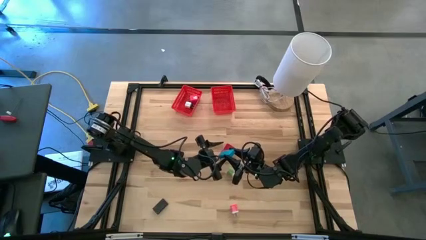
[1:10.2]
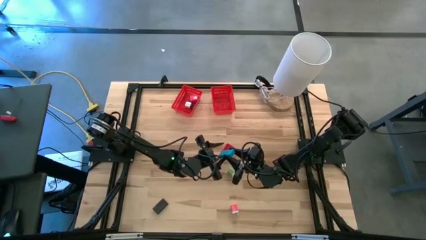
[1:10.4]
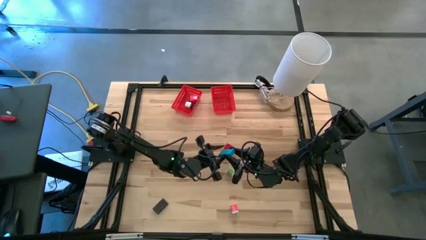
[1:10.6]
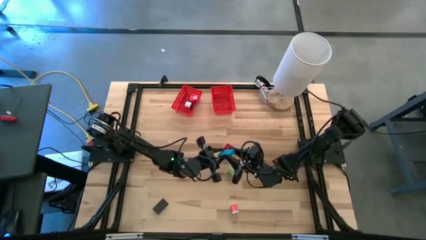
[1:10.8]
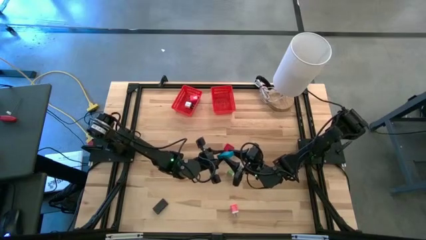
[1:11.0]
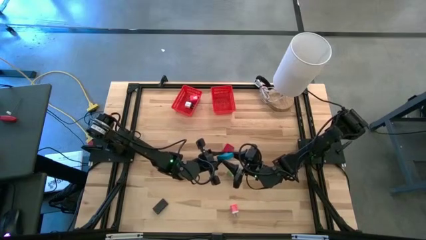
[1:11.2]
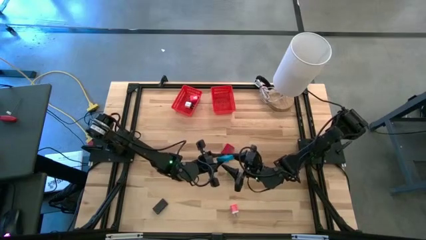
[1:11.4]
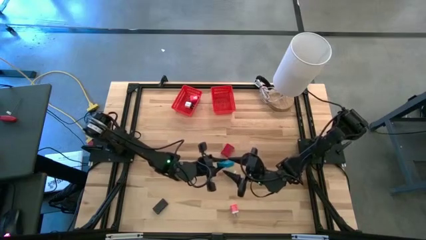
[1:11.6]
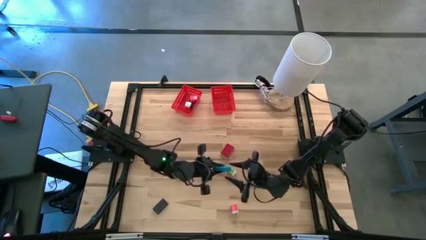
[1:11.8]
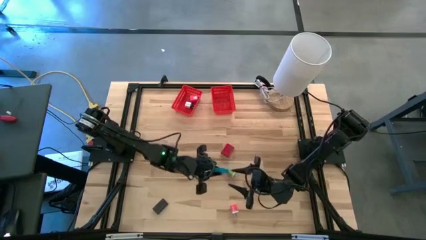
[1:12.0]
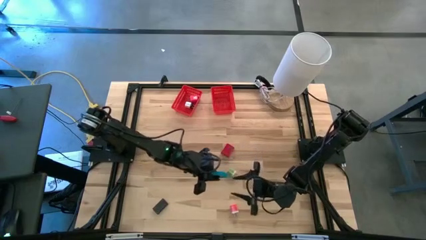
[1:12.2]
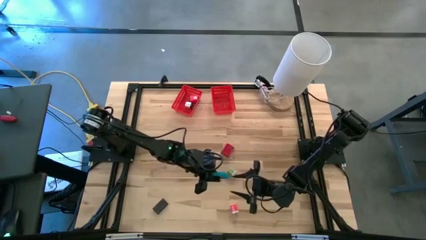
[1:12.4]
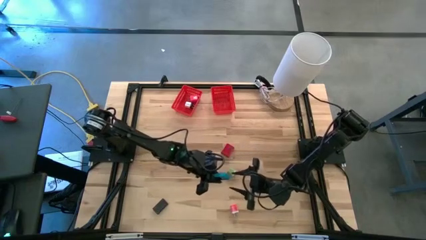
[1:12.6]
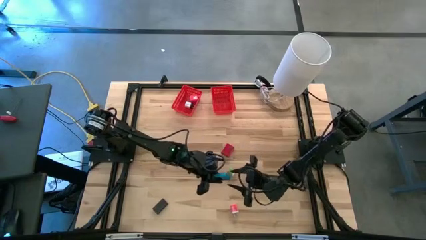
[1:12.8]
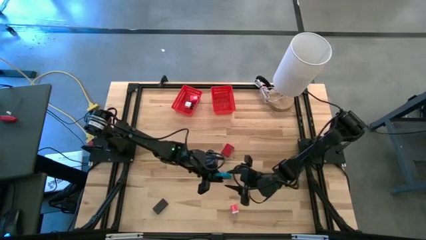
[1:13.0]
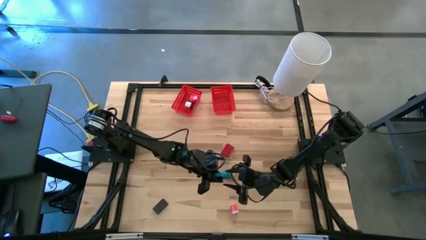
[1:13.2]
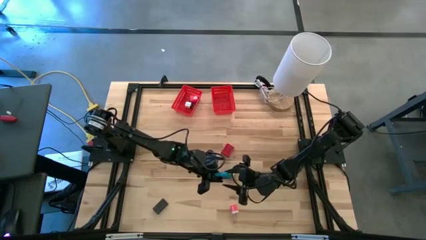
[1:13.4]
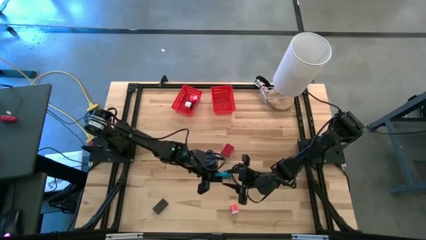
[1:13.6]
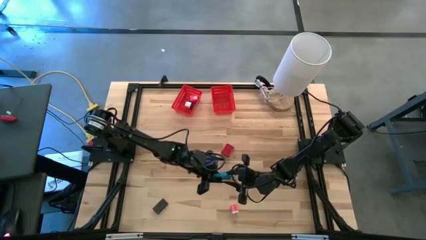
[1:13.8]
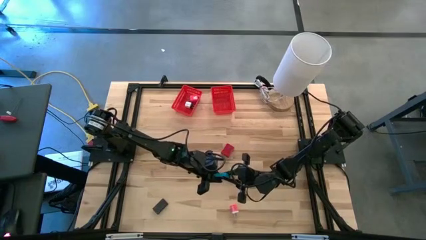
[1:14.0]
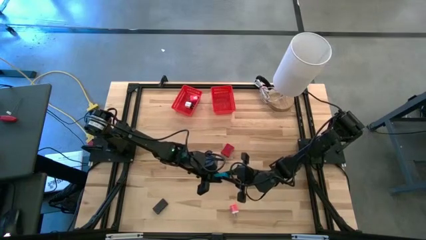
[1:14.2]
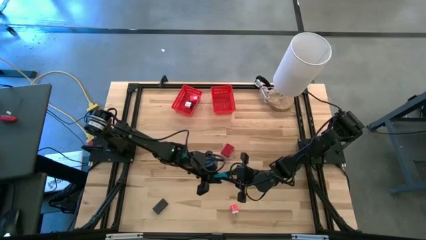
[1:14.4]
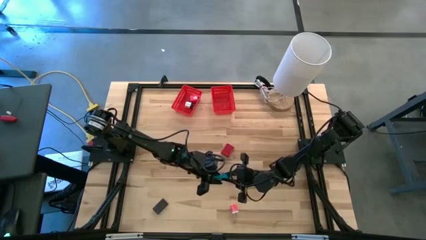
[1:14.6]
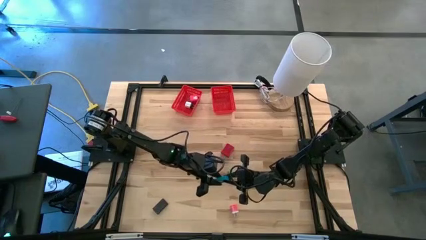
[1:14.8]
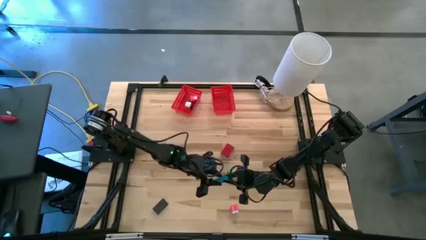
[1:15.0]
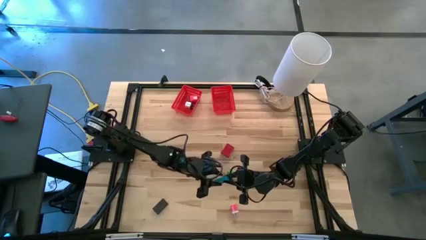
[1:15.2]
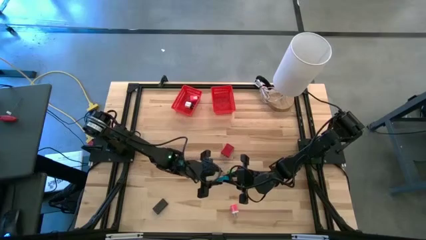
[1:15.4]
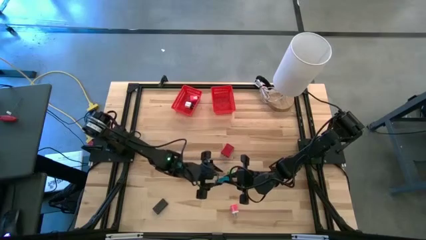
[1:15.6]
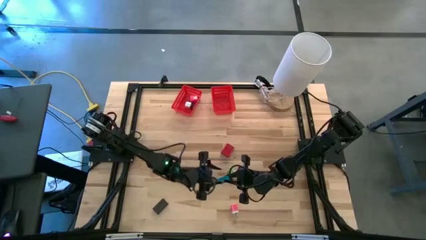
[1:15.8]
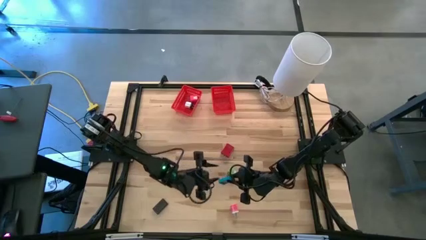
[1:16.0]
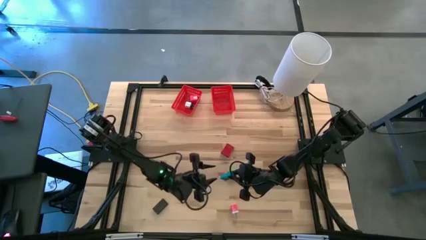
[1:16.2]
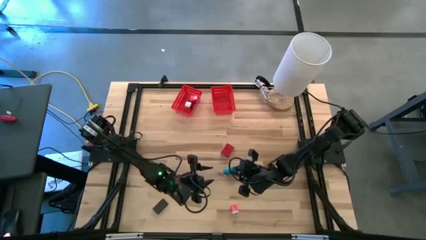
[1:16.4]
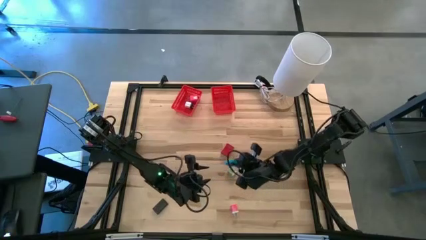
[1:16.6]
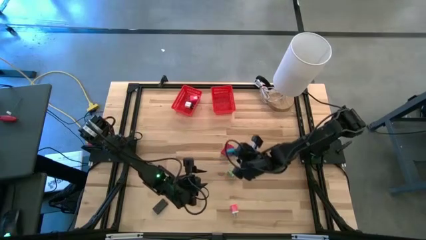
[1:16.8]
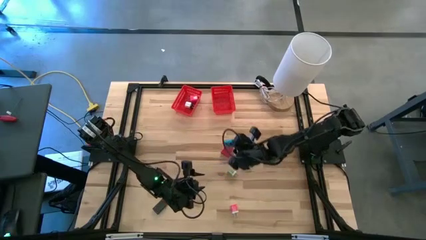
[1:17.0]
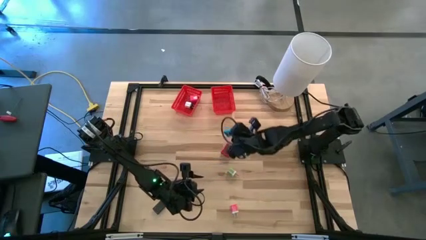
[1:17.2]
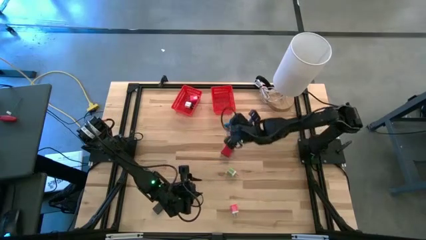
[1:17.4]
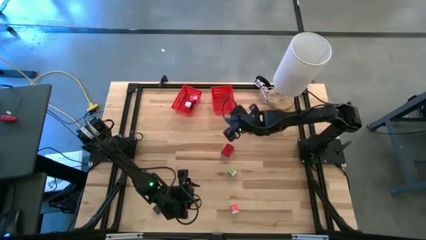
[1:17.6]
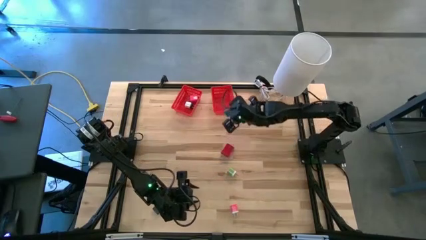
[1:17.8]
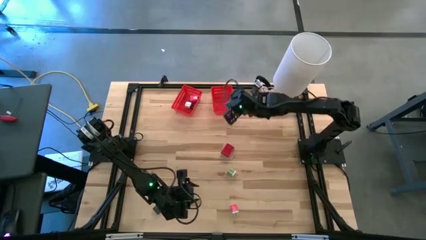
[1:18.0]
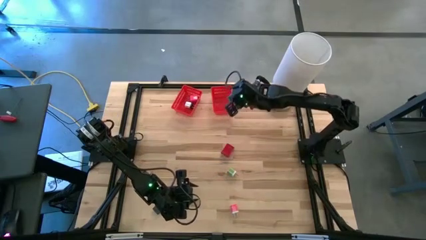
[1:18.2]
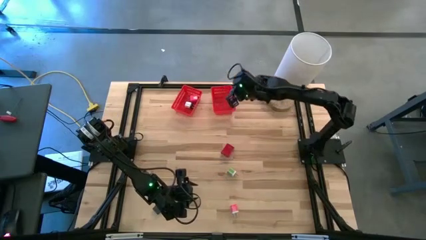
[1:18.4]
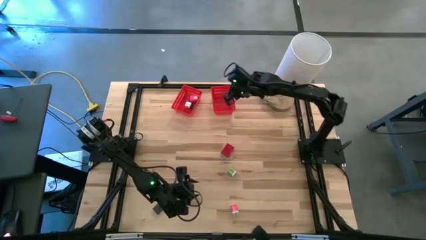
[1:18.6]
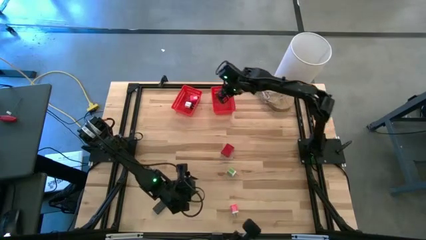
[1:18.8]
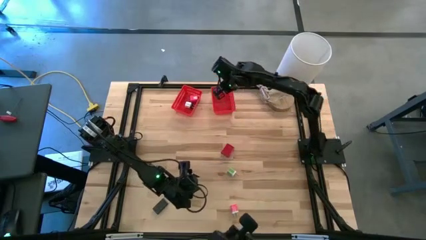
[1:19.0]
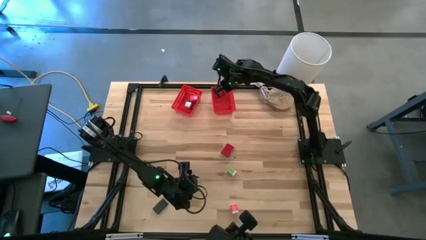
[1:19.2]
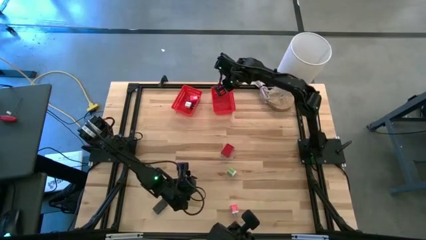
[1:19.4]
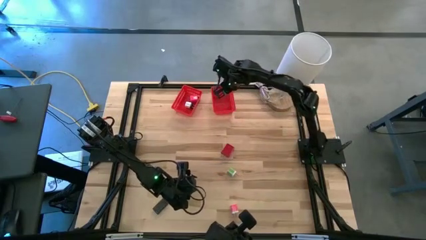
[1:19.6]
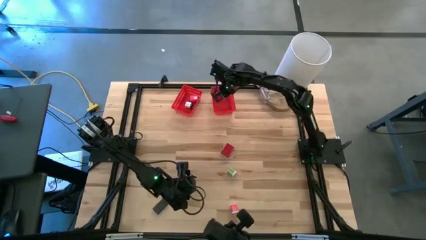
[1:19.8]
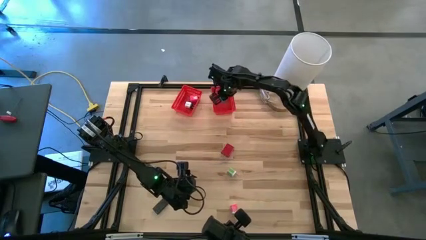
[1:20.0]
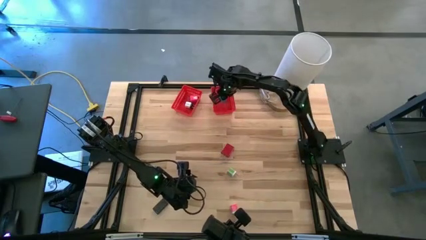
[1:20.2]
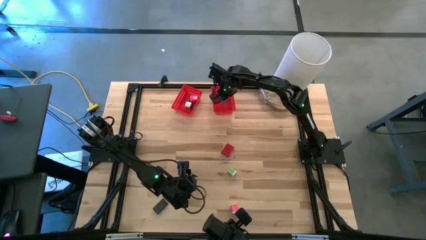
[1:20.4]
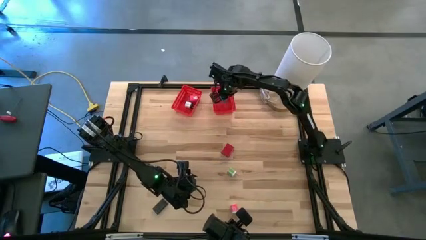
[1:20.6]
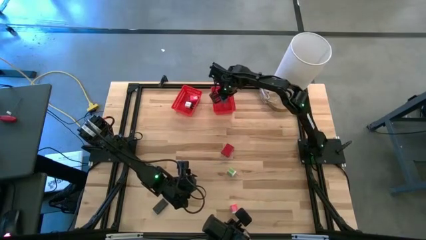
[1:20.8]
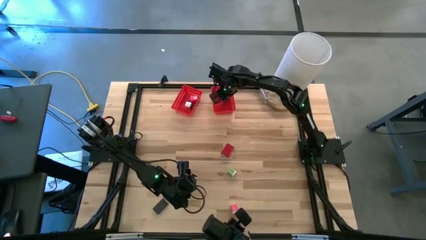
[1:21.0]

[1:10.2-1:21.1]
Task: Pick & Place Office items
Put the blue digital clock into the right red bin
